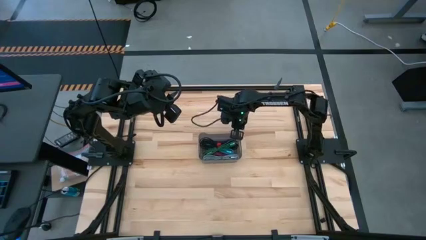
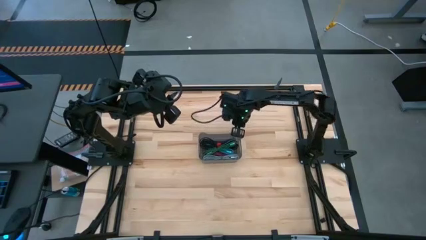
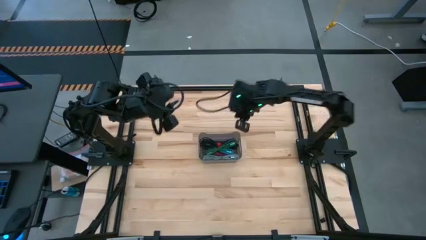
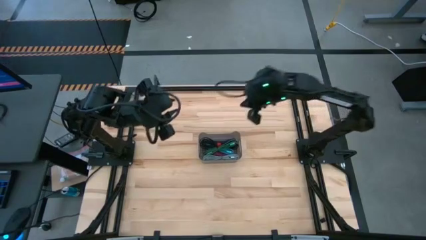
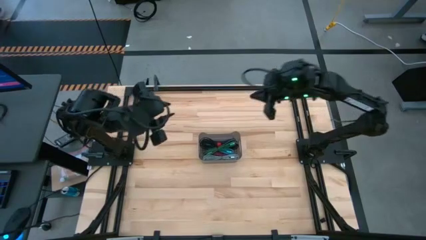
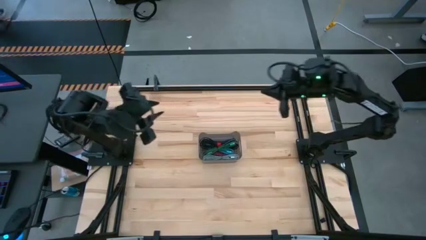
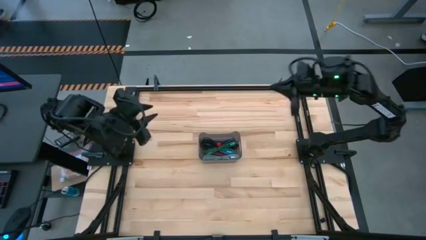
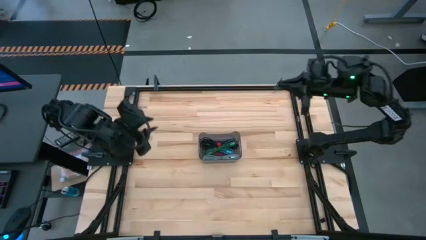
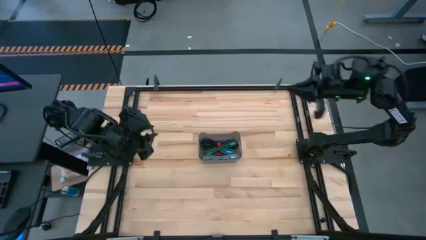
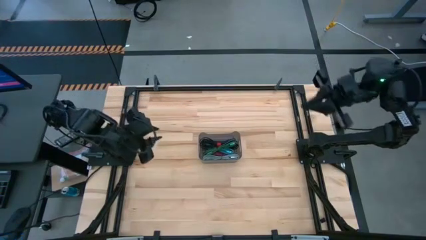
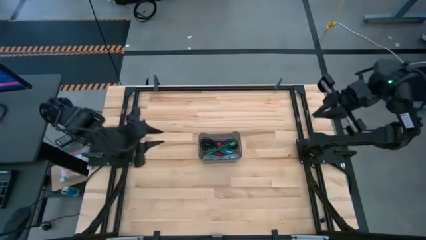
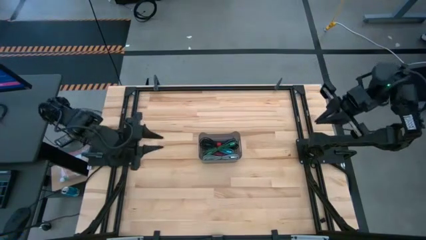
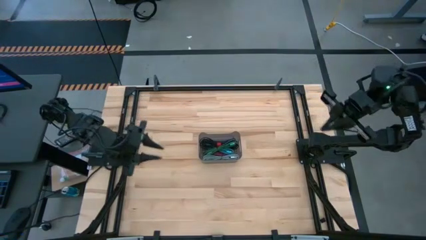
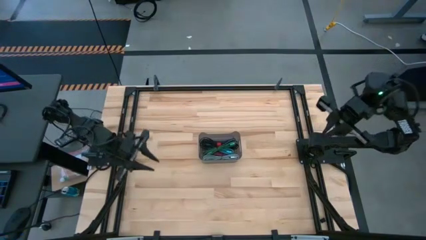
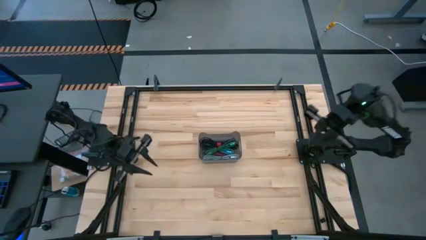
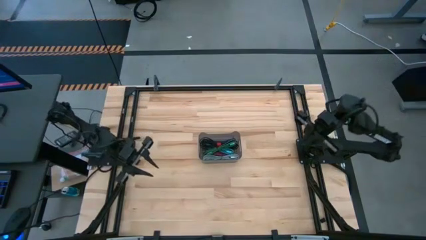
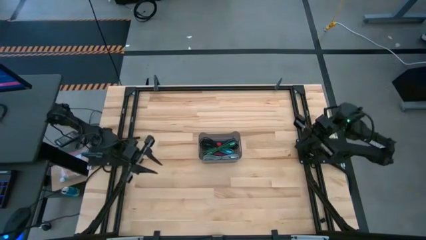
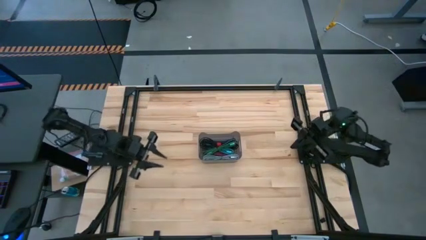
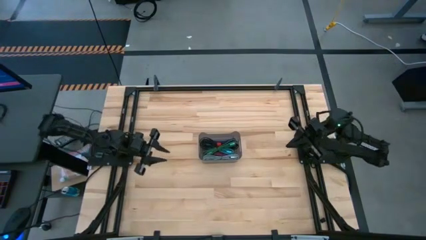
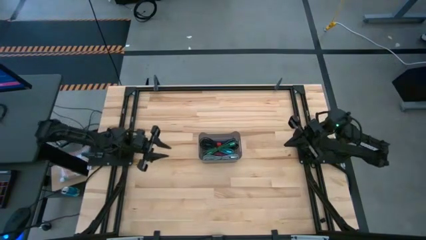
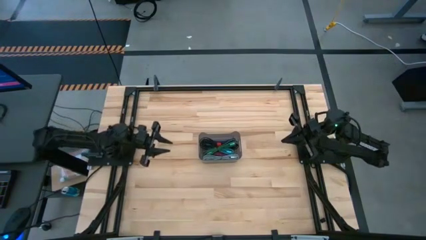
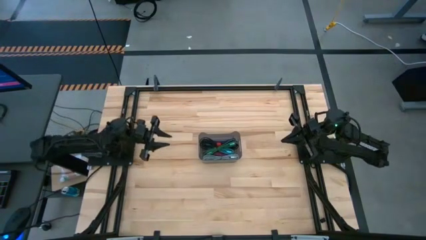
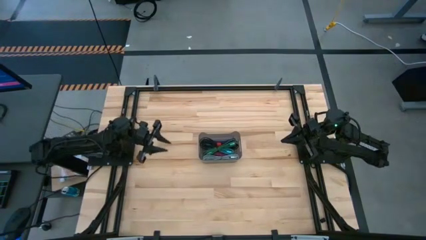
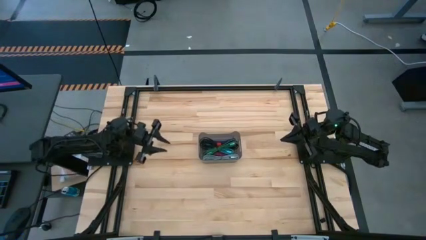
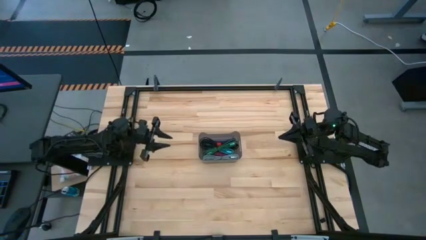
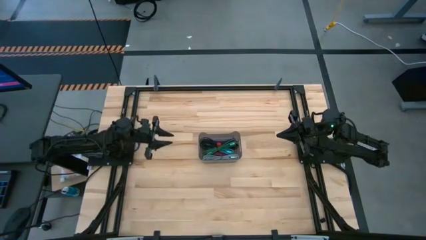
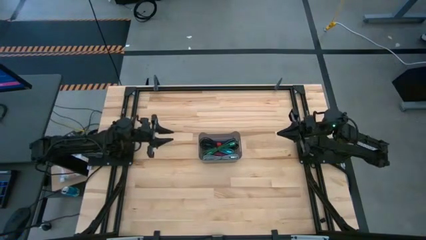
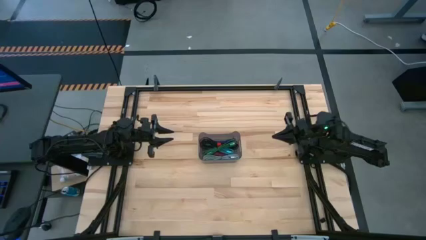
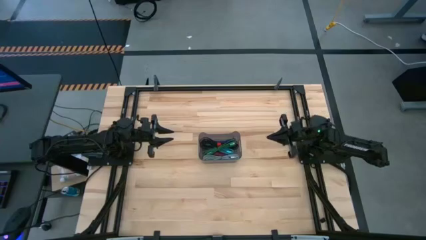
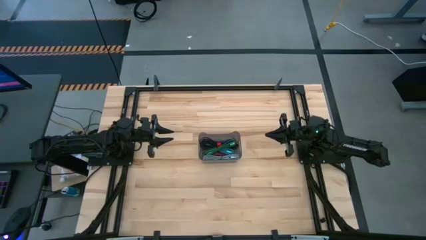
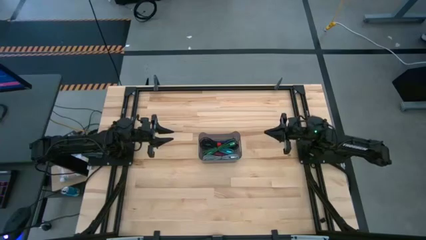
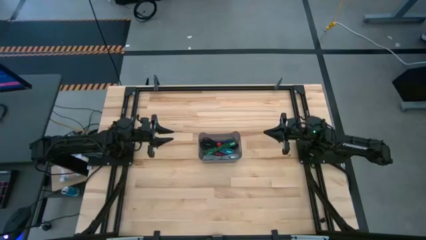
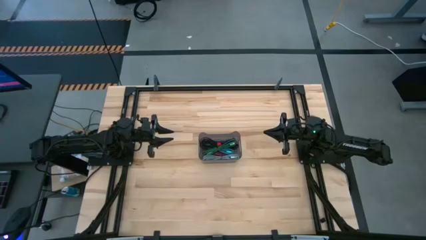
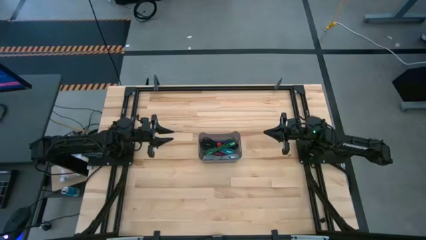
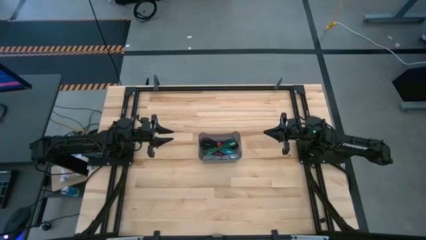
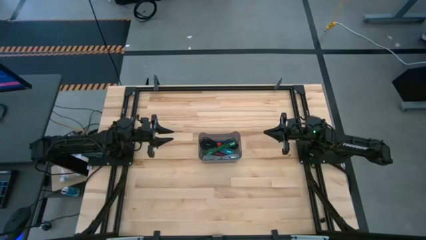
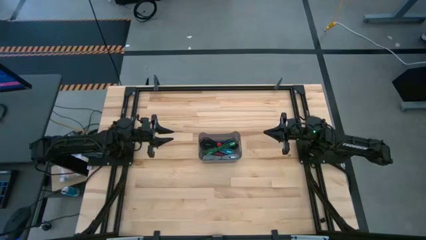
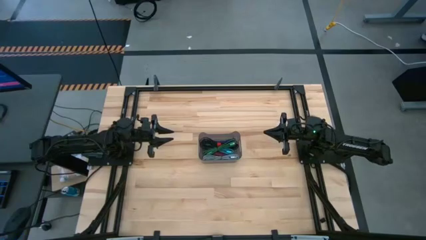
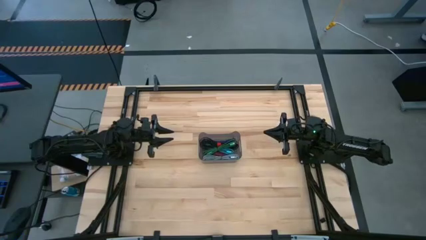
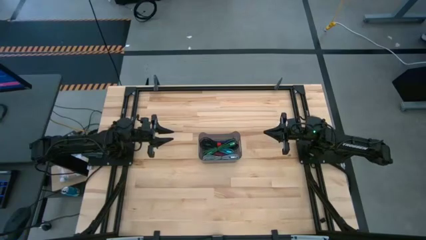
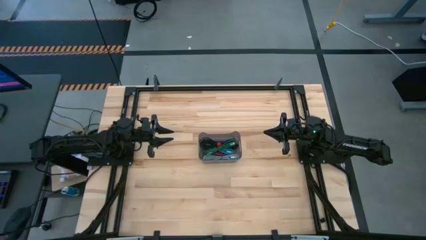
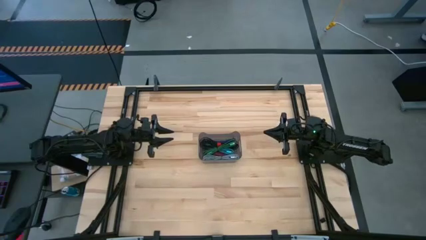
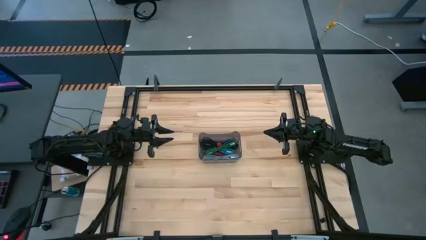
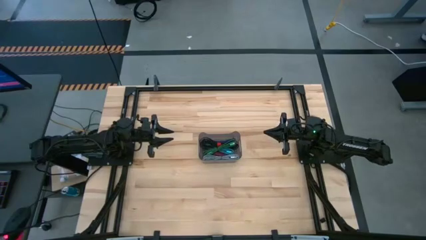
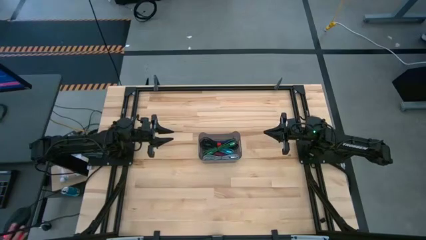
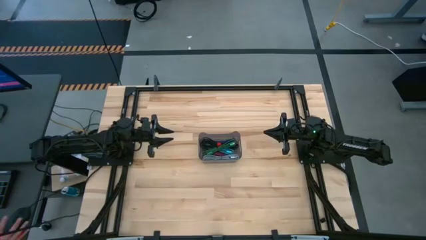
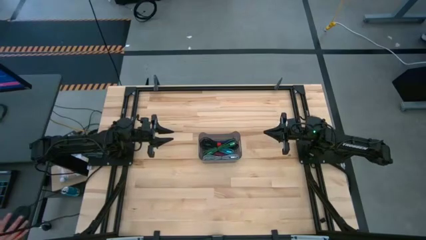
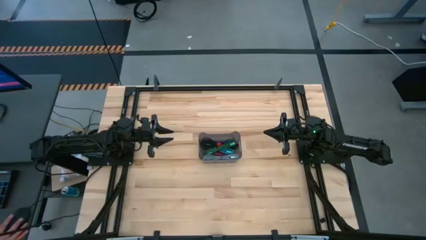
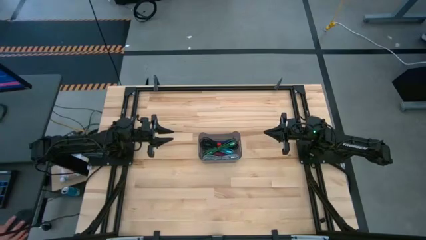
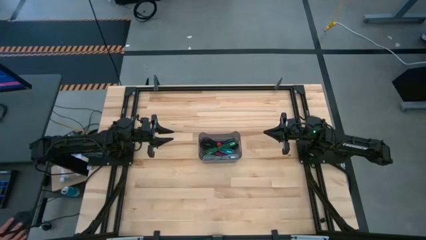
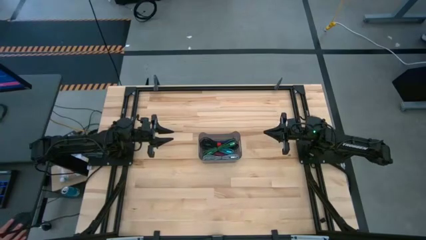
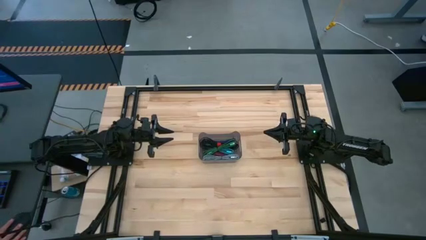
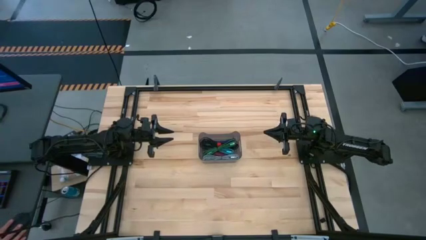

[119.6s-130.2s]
Task: Pick and place USB-C Cables
Return to Home Position

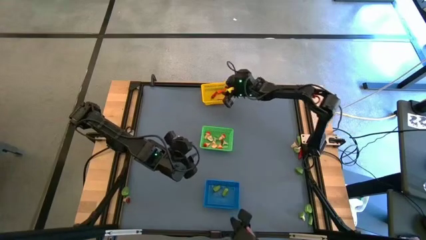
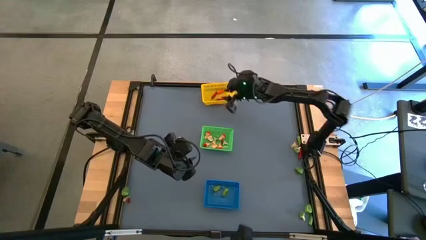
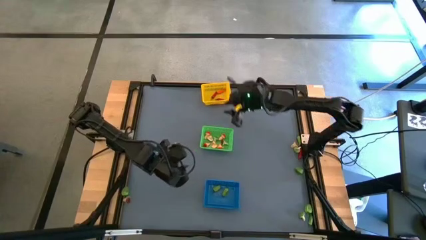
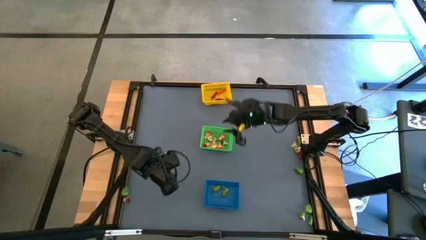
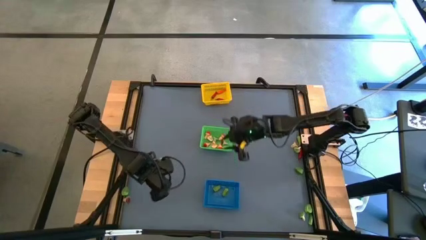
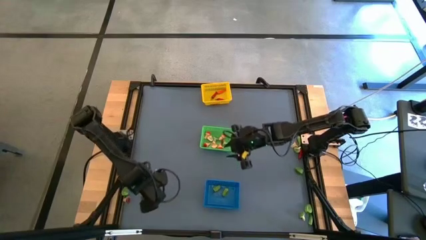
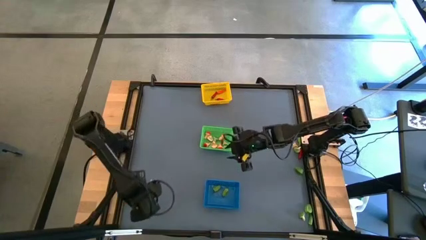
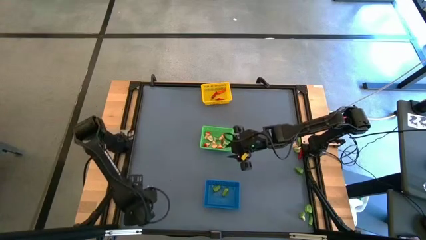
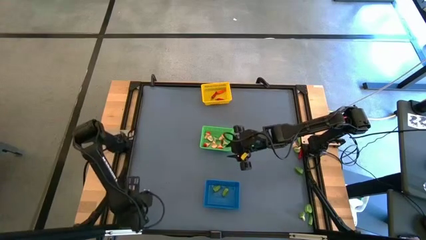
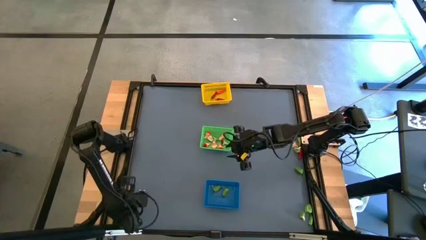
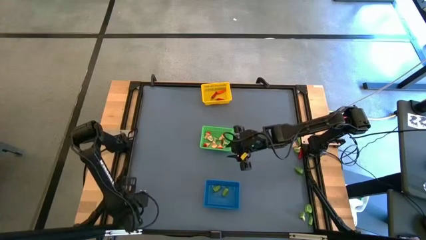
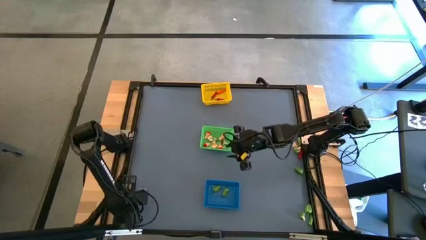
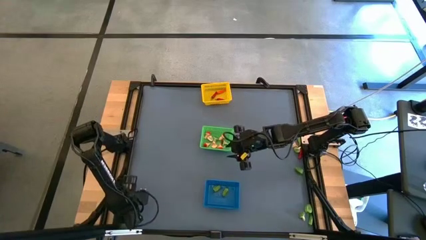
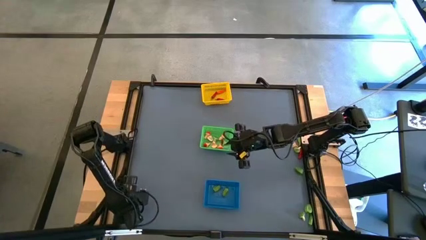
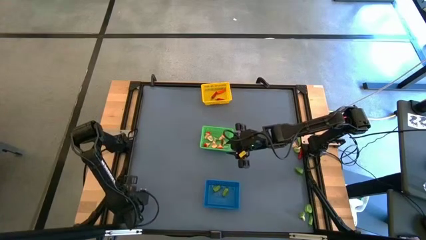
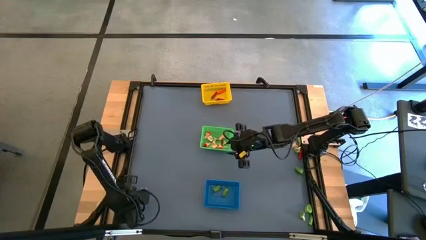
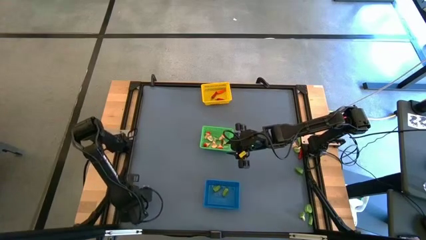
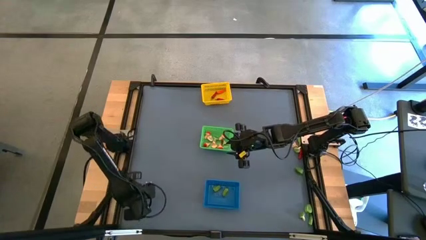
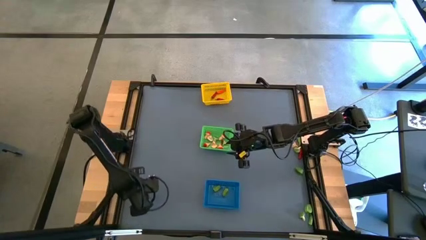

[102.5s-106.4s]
Task: Sort produce into baskets
Put the brown mushroom into the green bin

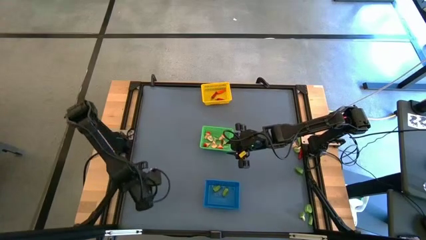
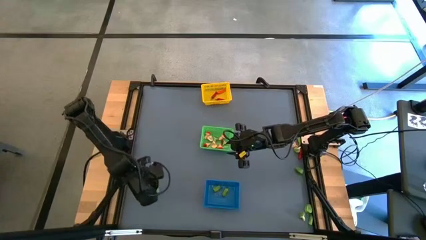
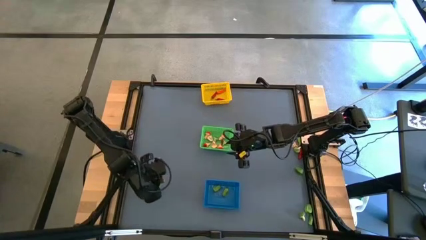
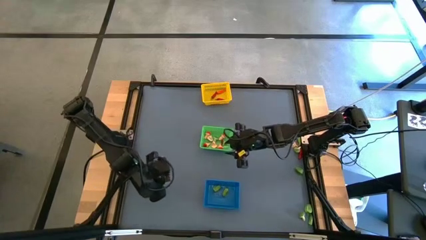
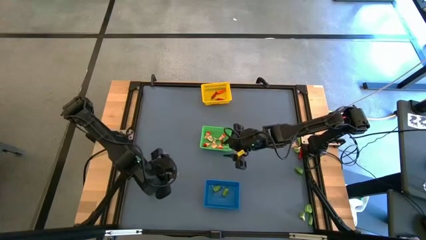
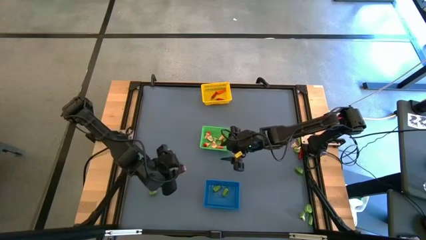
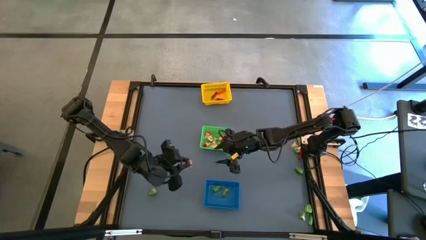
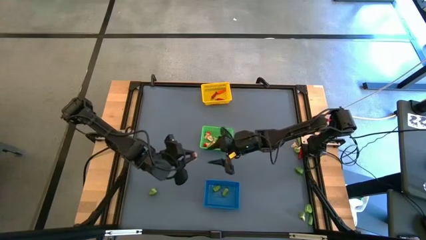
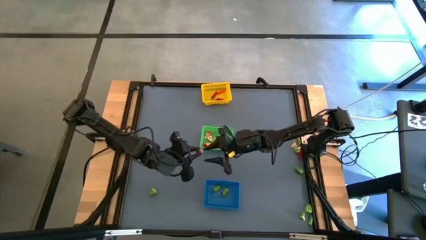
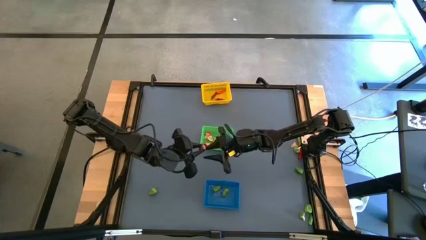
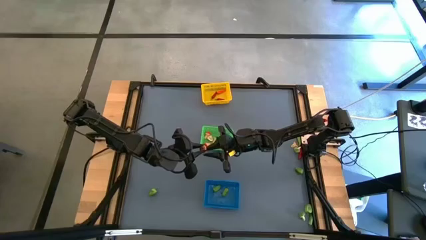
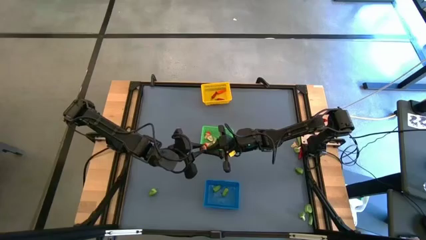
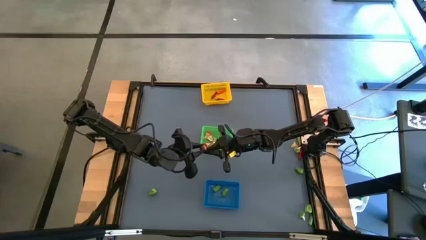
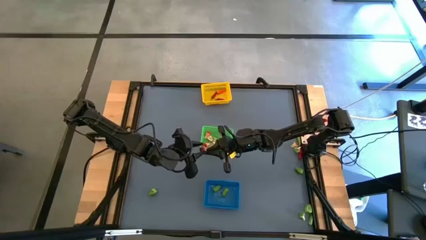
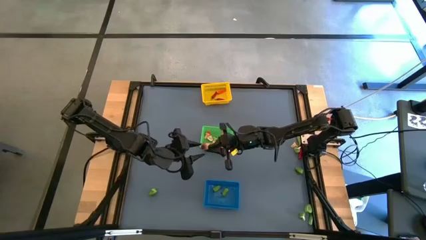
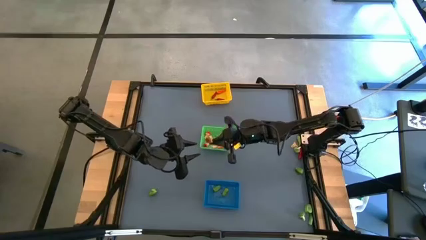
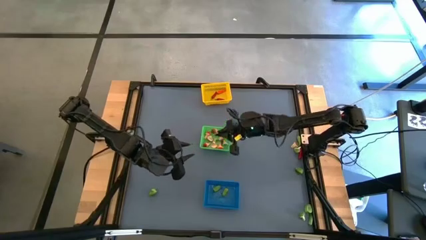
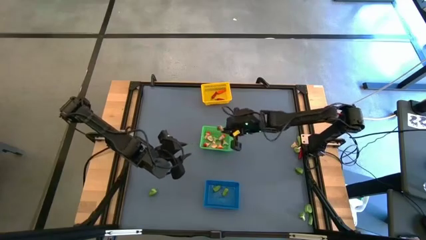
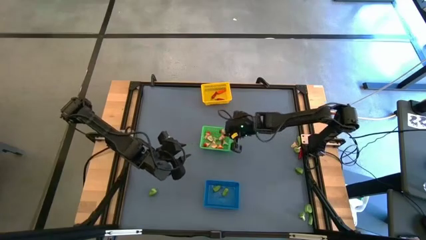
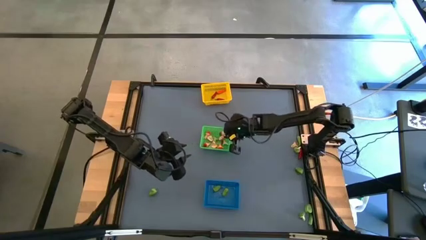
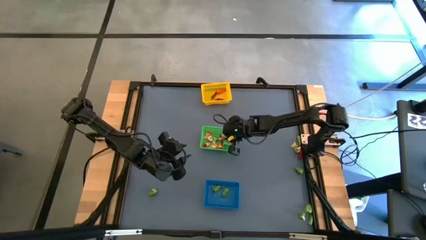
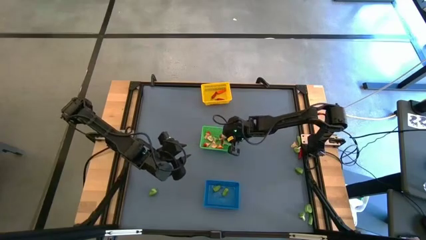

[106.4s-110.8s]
Put the brown mushroom into the green bin
